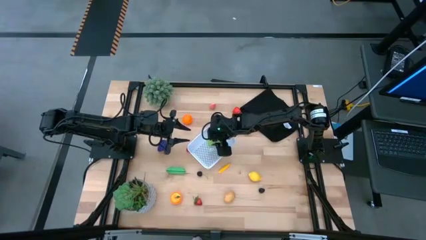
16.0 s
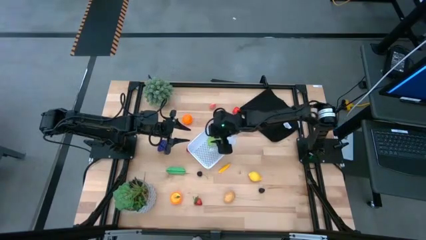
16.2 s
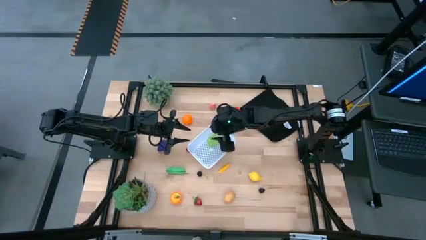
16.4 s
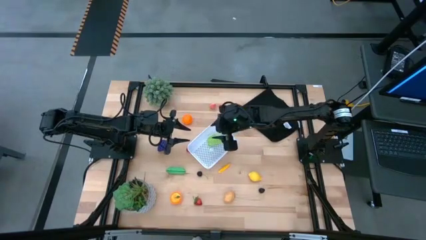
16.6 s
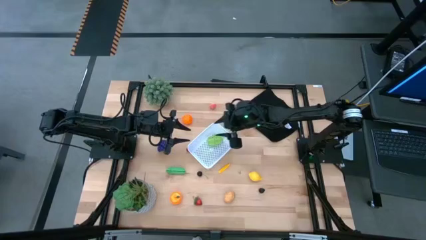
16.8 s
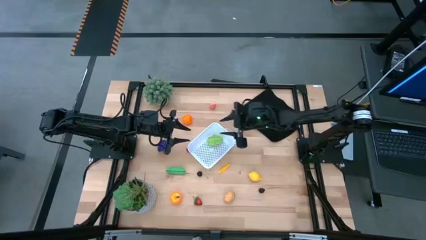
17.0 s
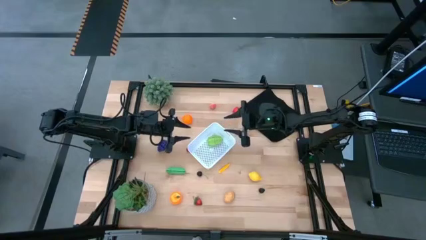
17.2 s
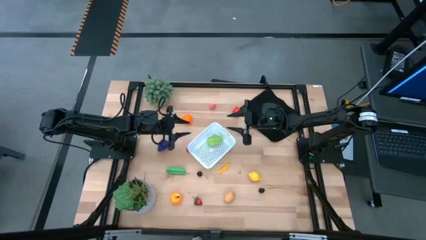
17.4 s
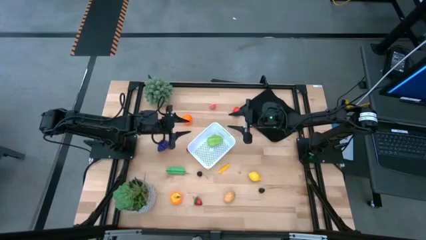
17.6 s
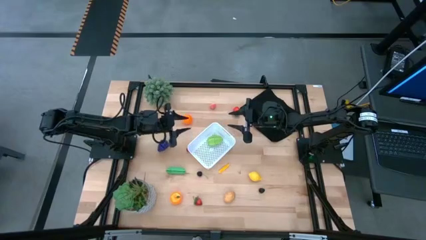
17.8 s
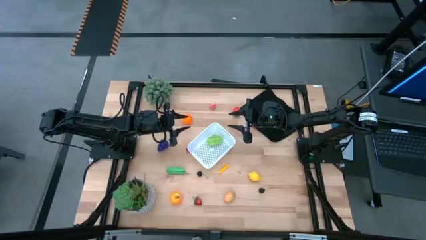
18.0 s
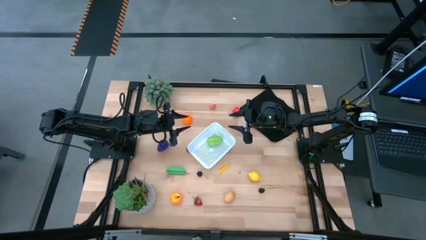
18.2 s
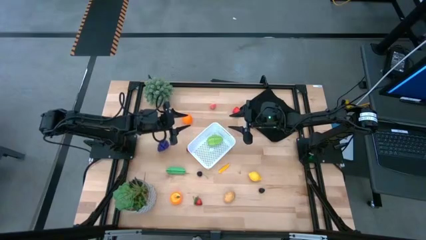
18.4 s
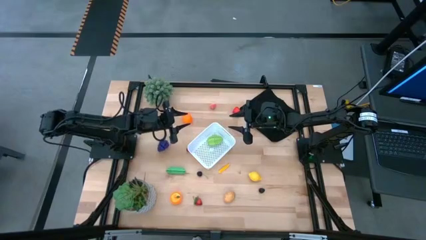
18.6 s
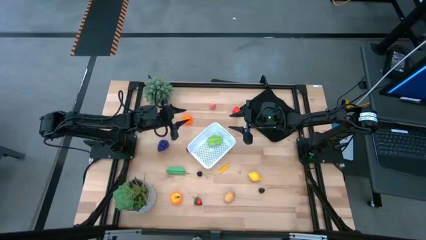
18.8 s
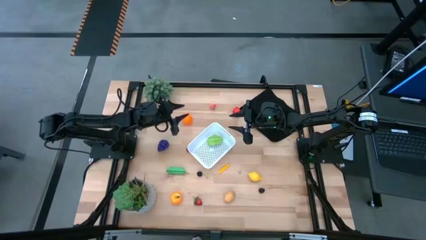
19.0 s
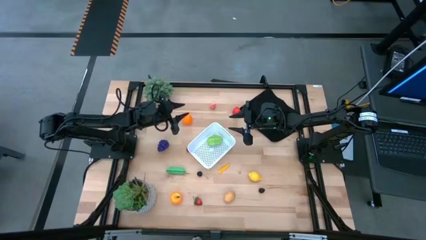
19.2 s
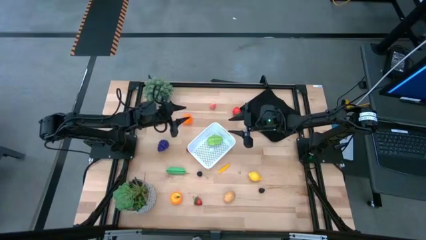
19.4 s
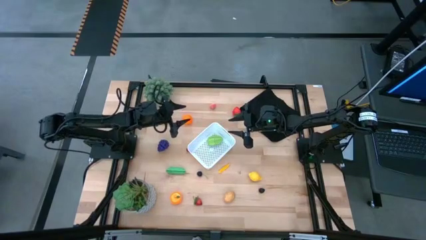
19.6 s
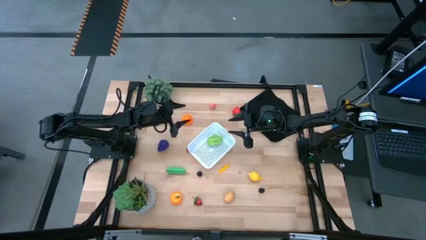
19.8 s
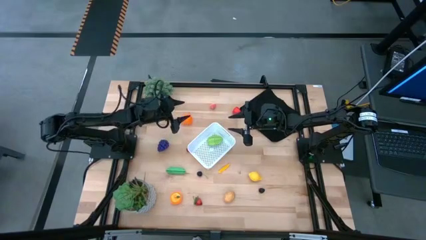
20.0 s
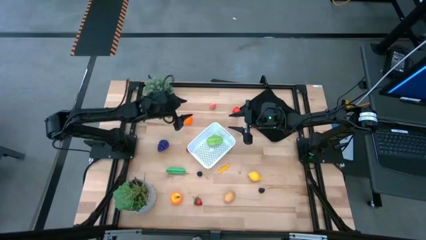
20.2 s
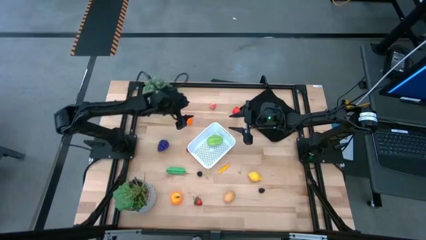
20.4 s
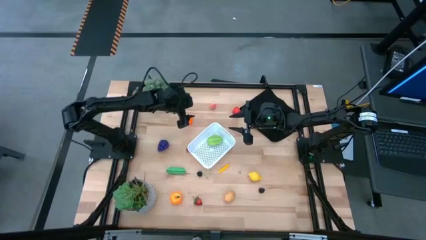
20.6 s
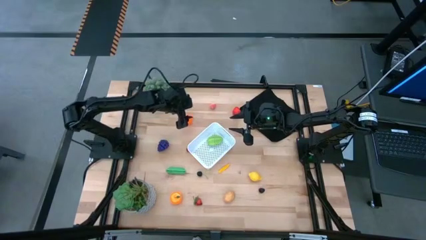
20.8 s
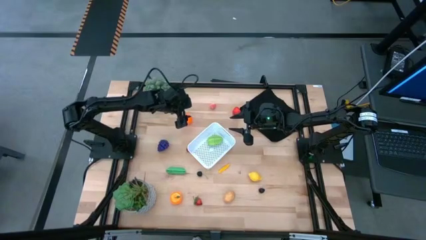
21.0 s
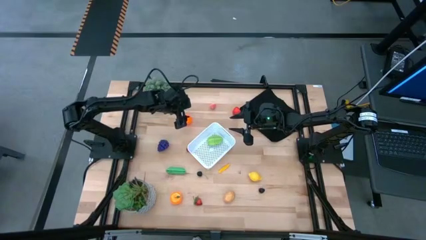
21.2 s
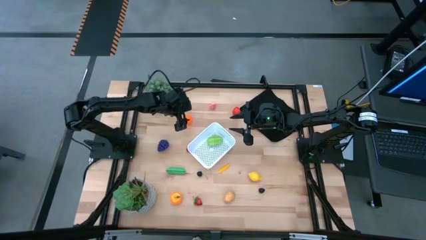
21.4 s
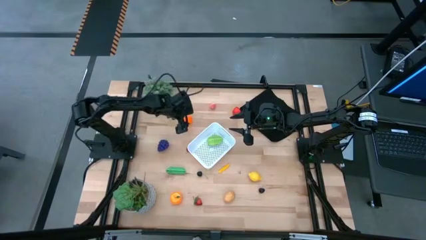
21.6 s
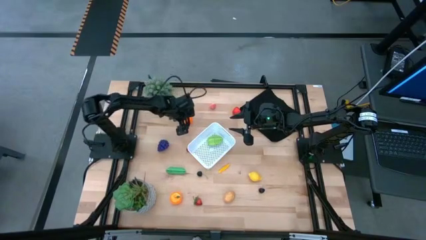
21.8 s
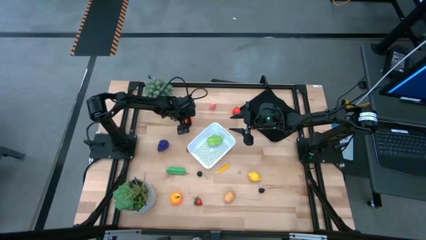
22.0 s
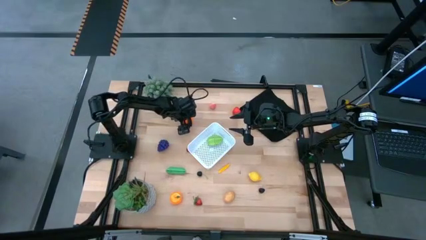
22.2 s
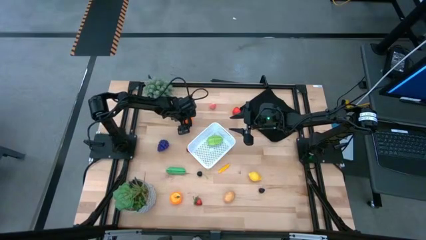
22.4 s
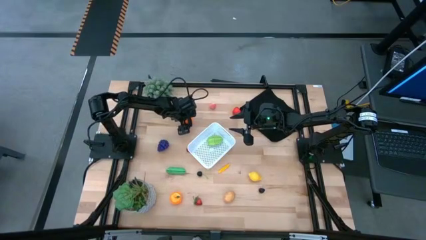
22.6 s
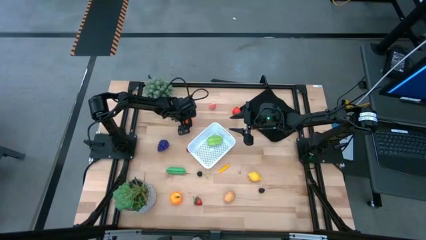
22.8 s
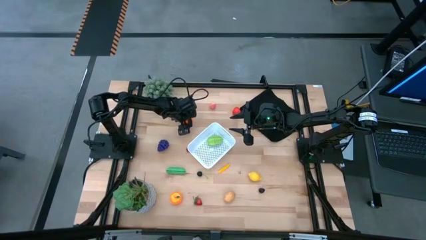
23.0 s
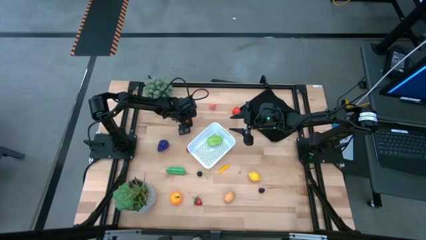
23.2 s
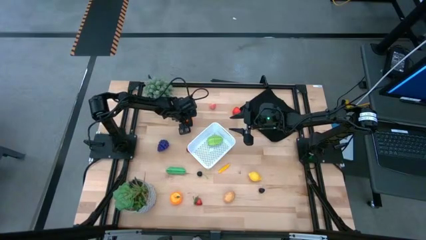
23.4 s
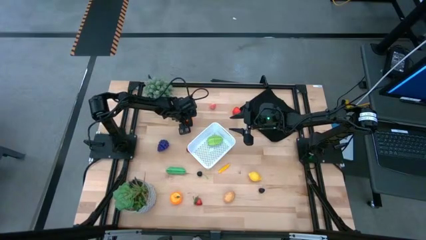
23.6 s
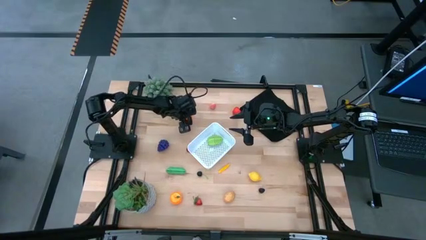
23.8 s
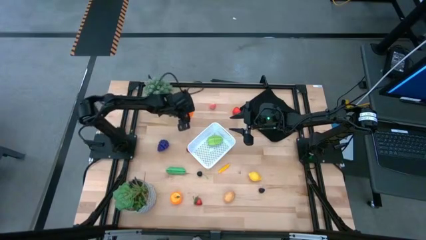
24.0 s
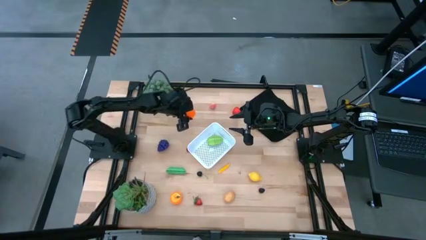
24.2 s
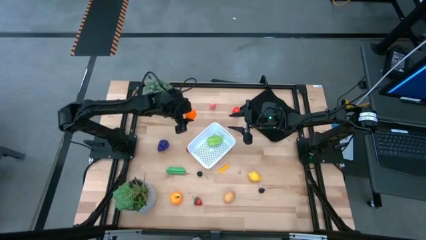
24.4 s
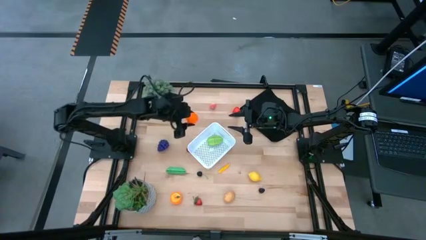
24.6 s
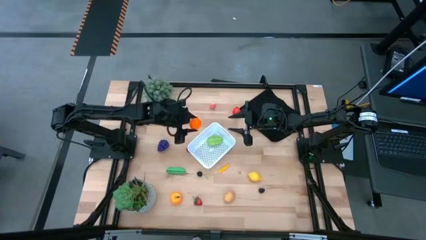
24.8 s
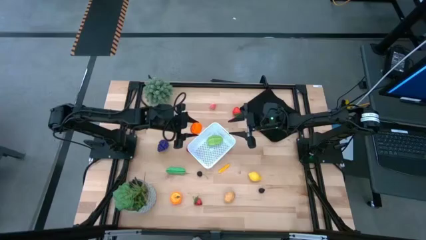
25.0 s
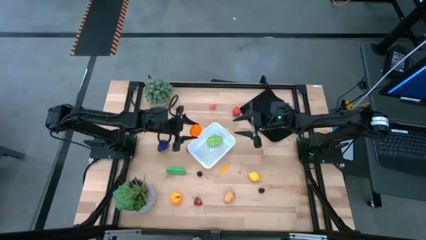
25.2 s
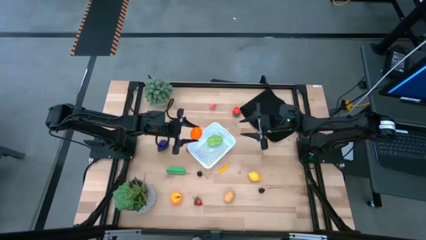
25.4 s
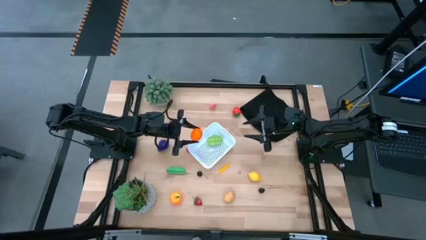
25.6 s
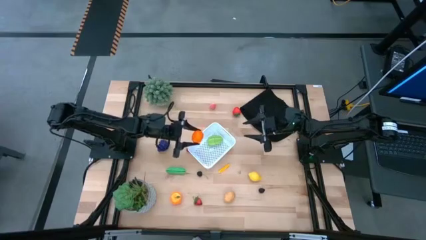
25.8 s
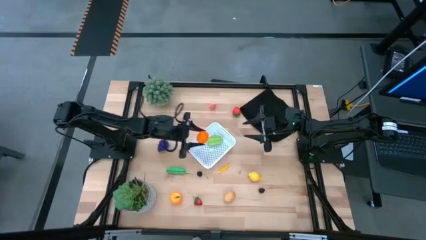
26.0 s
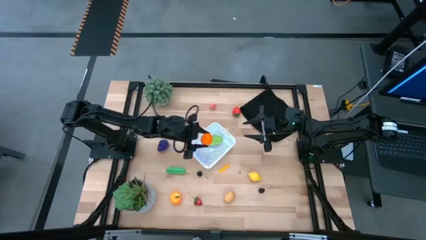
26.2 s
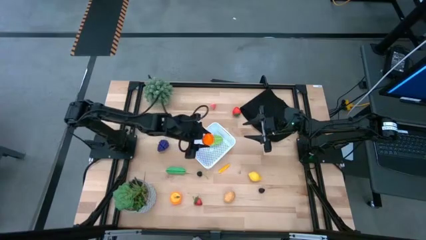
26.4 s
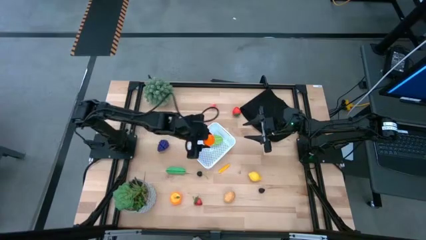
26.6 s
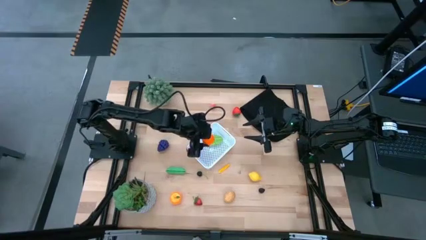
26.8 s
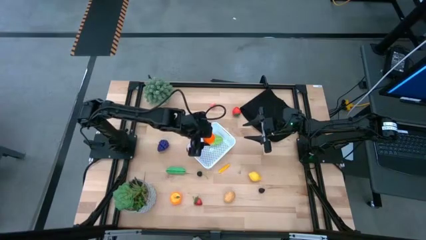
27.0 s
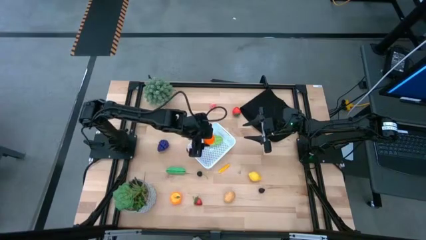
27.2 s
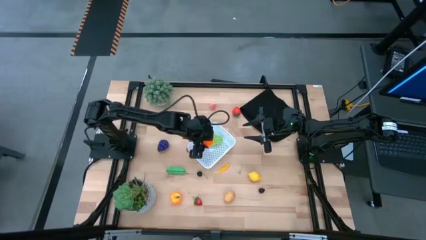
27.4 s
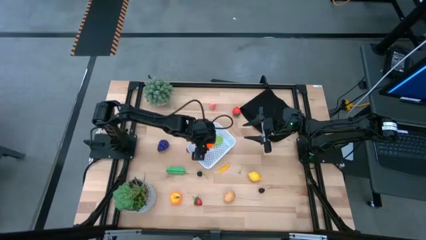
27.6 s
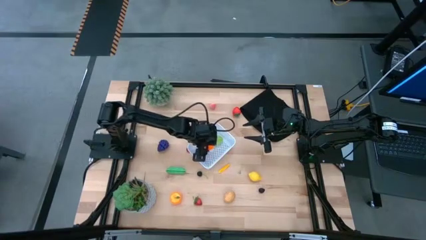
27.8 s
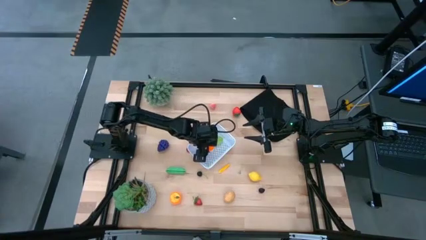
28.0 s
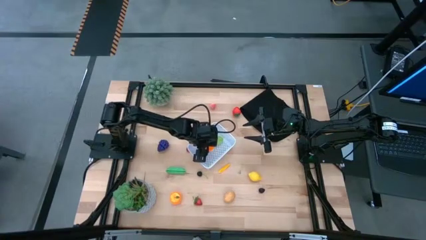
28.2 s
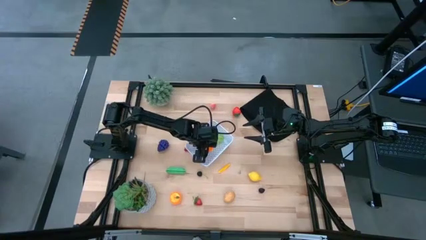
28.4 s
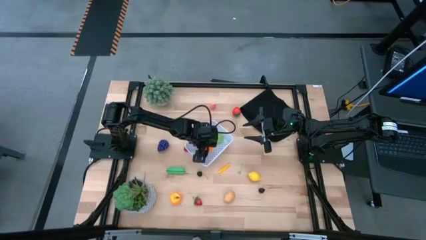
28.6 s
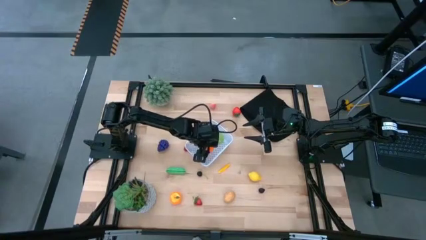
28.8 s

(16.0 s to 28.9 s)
Task: Pick and placing Produce into tupperware
Put the pumpkin into the white bin
